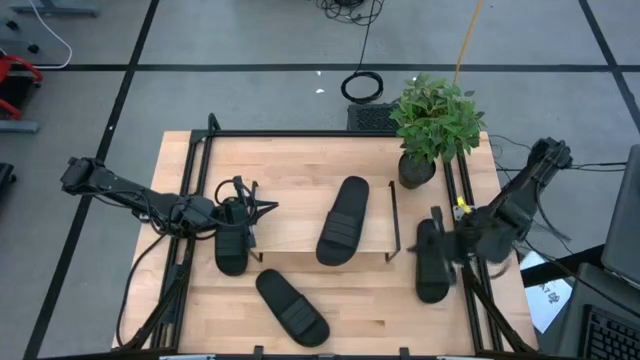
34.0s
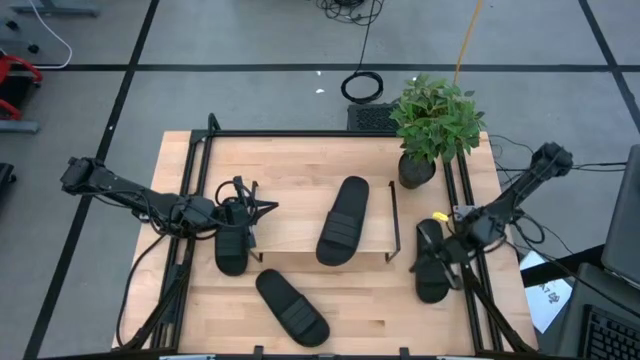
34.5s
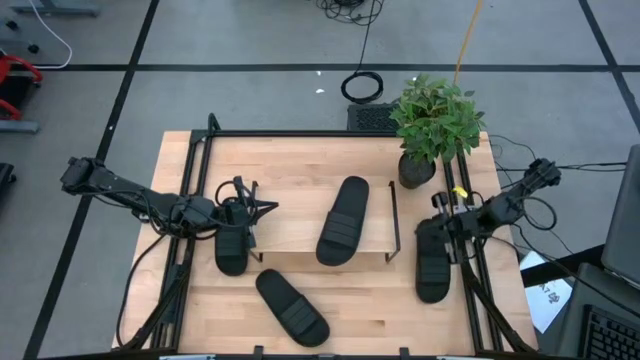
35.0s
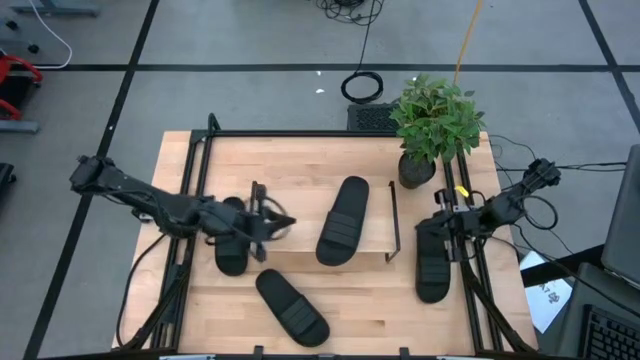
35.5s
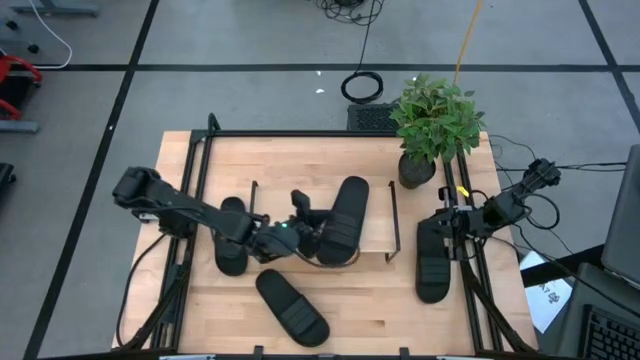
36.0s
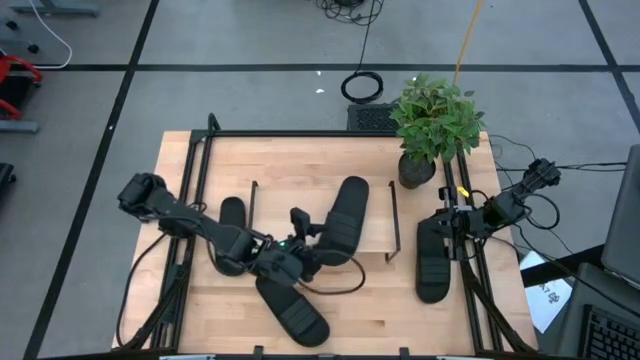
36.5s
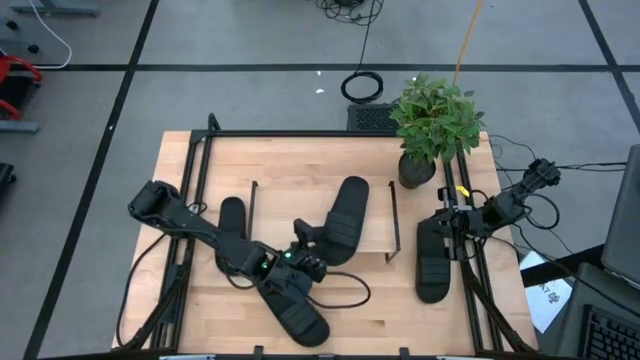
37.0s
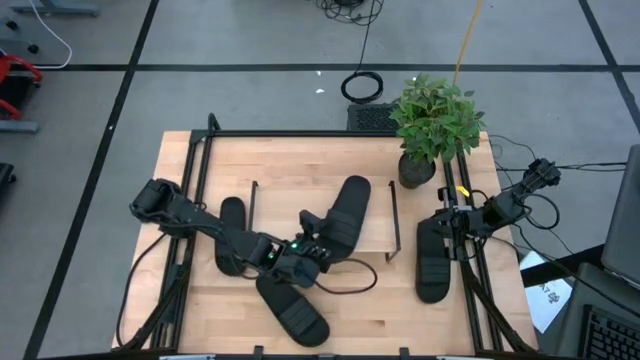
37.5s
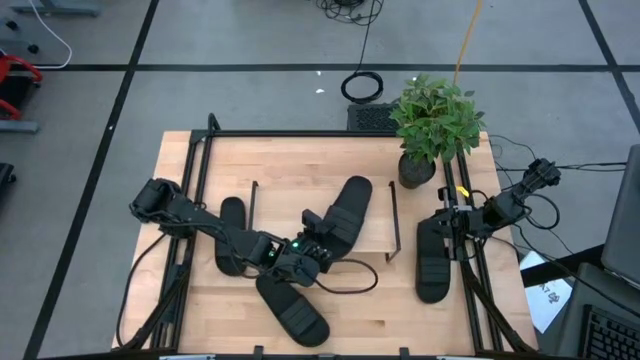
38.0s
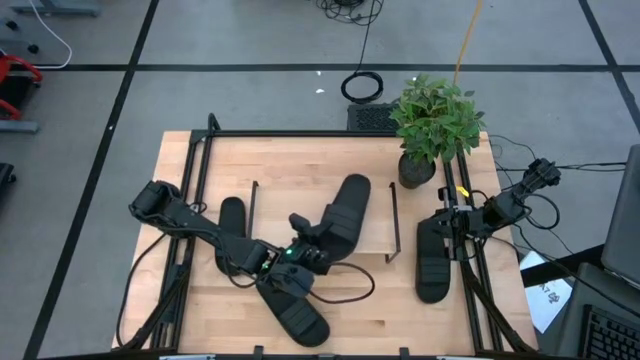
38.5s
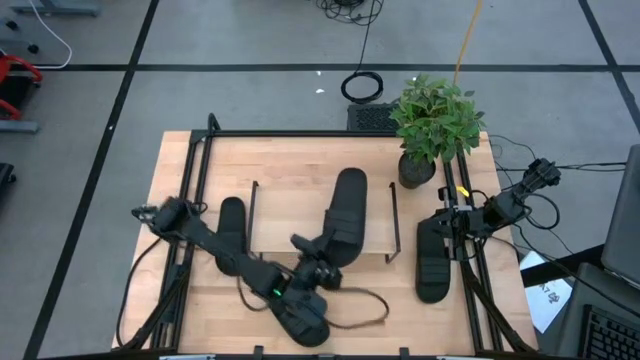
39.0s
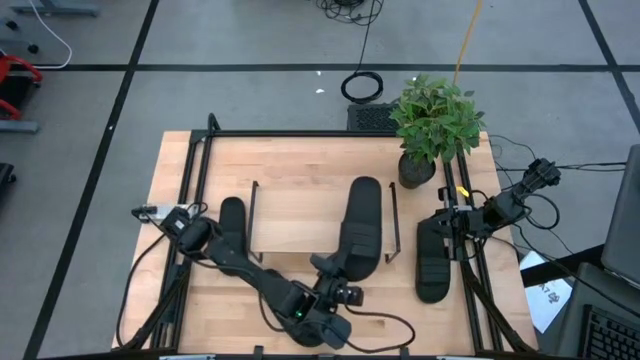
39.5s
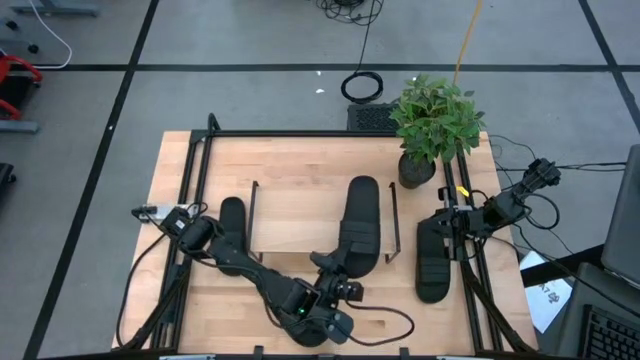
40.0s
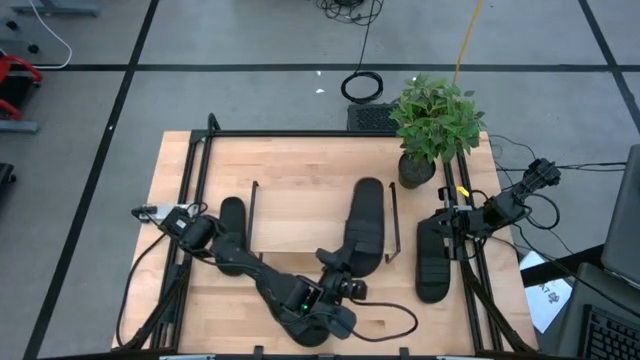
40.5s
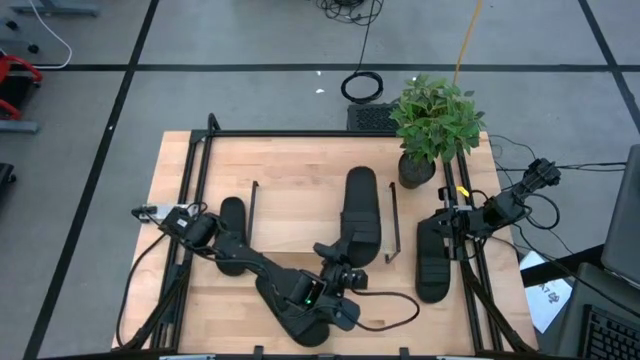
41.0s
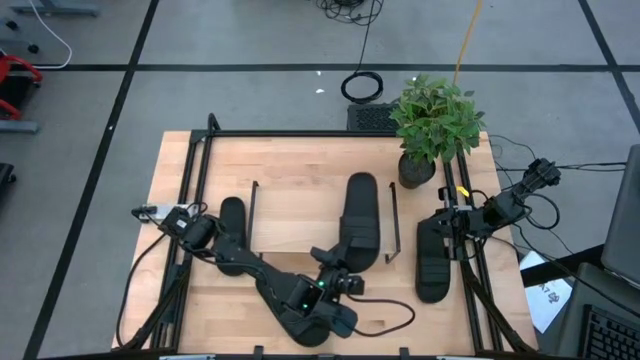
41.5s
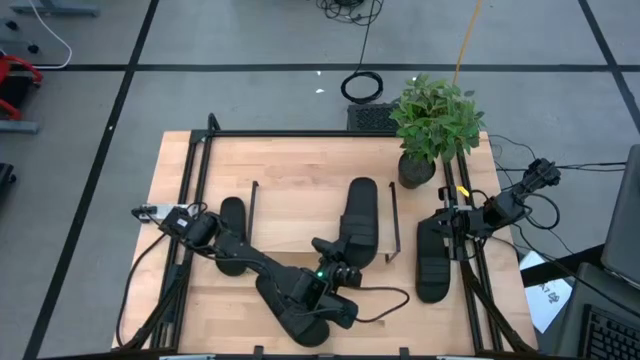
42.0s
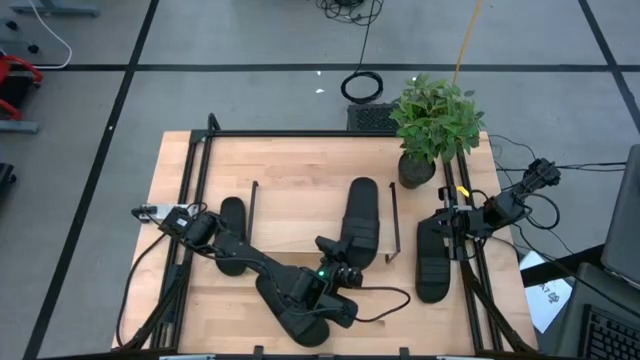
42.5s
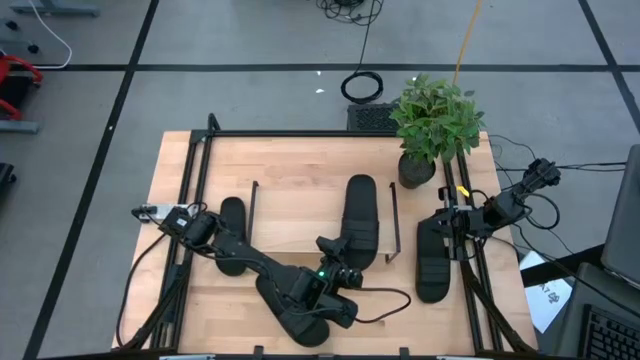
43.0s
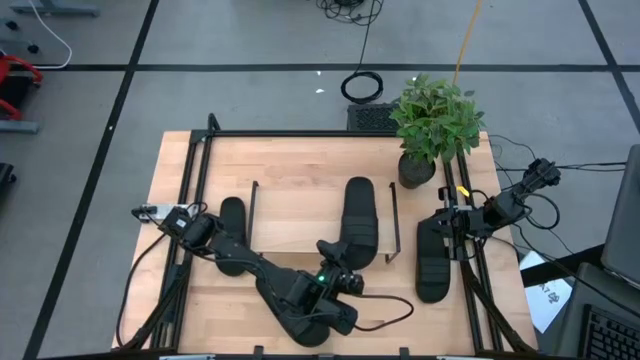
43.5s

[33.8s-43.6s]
Task: Pick and place slides into the shelf
Adjust the black slide on the shelf

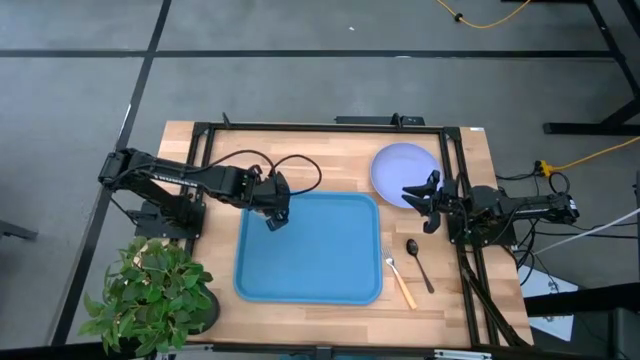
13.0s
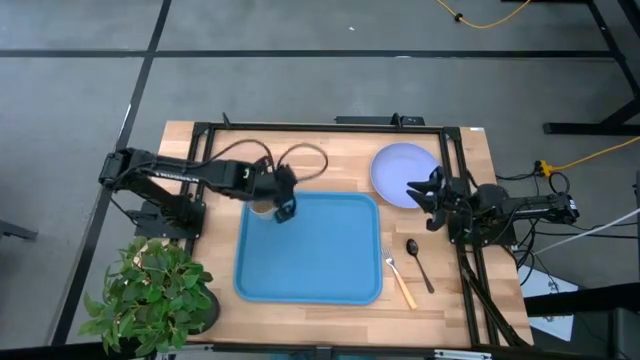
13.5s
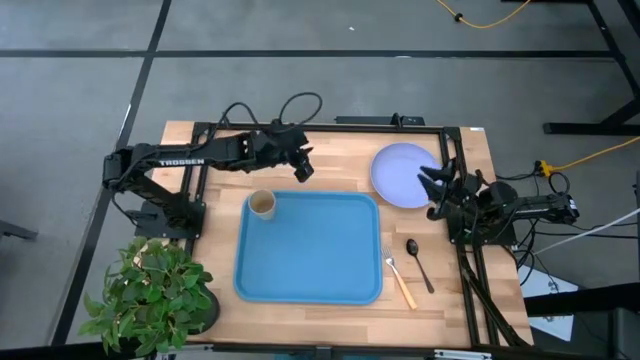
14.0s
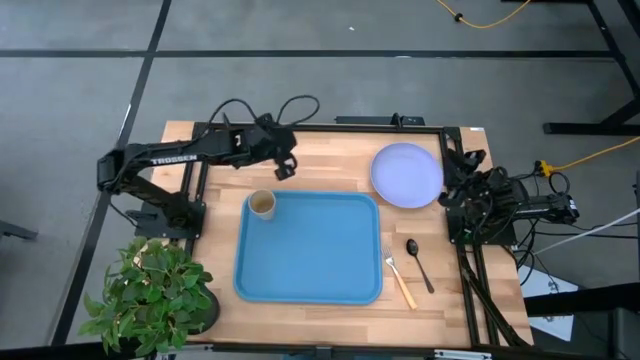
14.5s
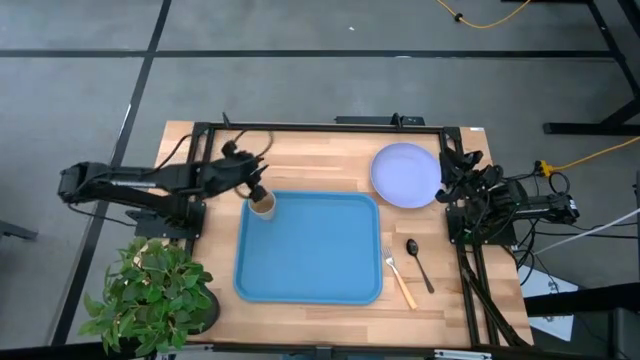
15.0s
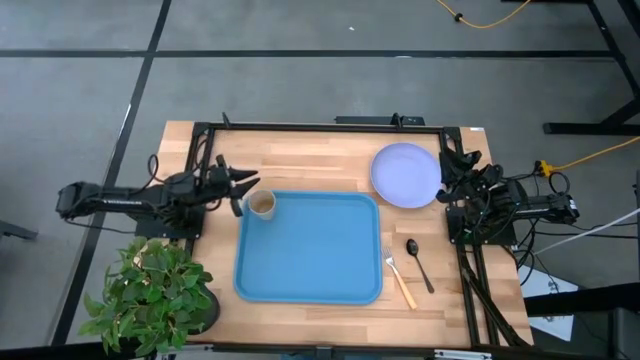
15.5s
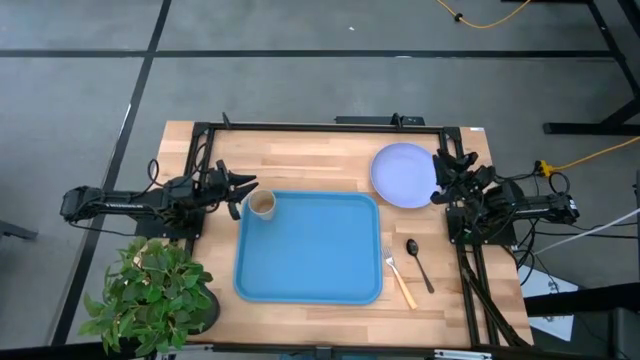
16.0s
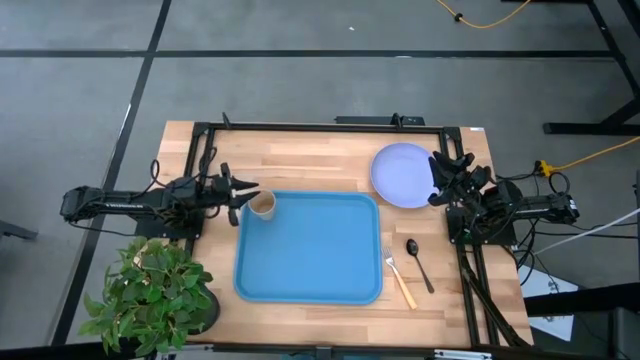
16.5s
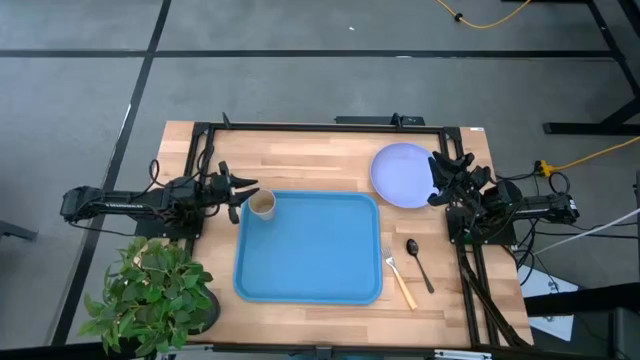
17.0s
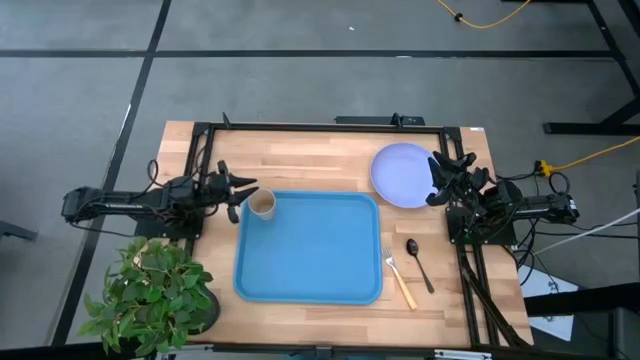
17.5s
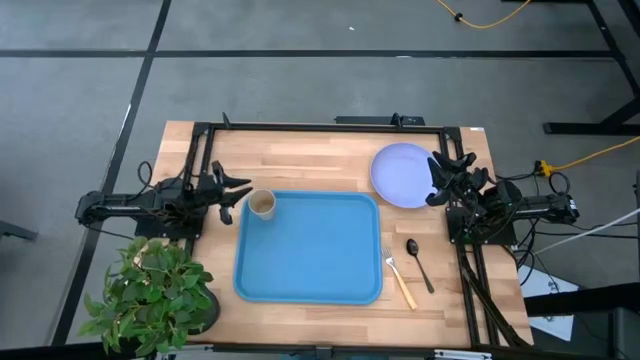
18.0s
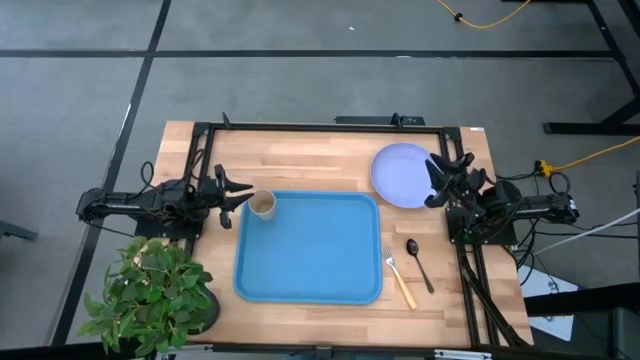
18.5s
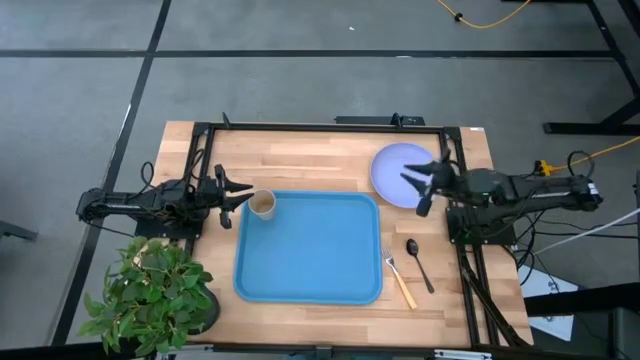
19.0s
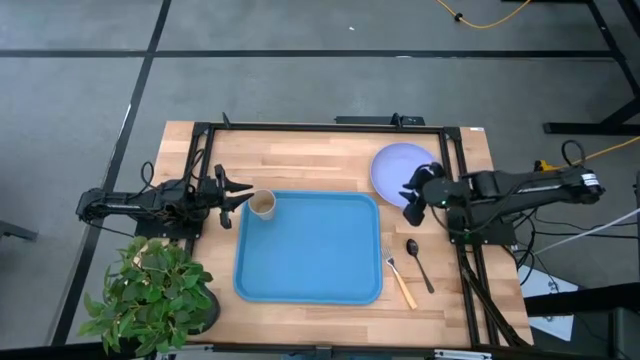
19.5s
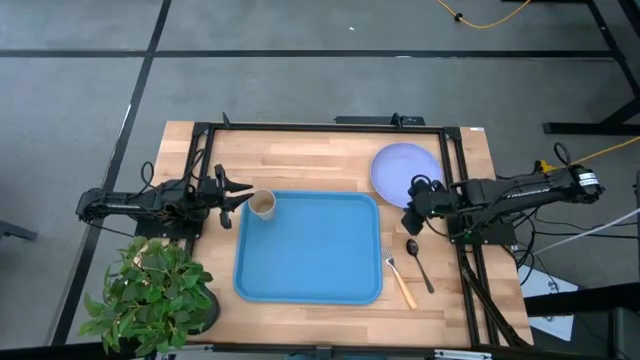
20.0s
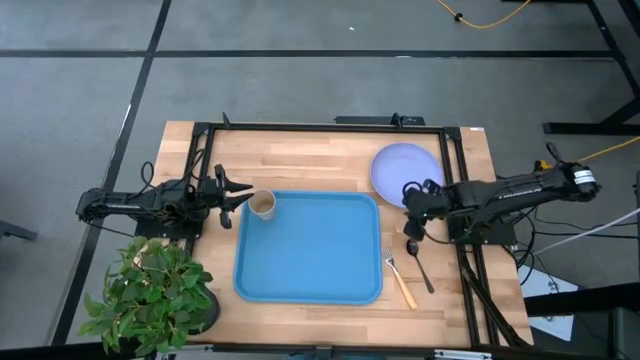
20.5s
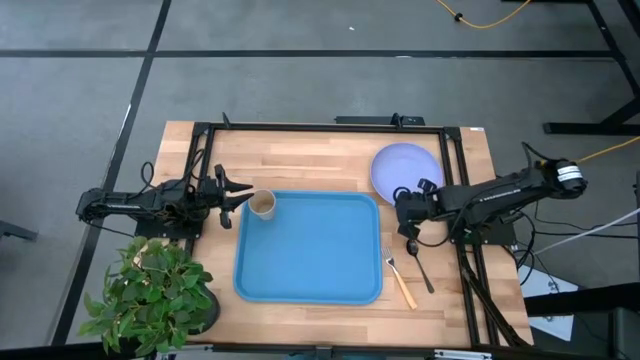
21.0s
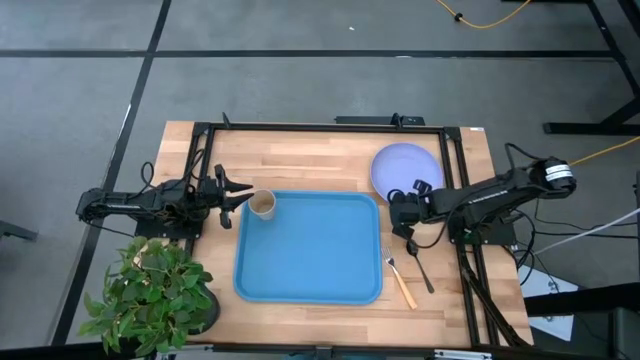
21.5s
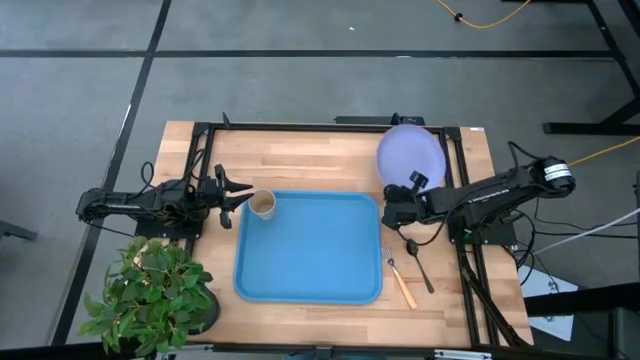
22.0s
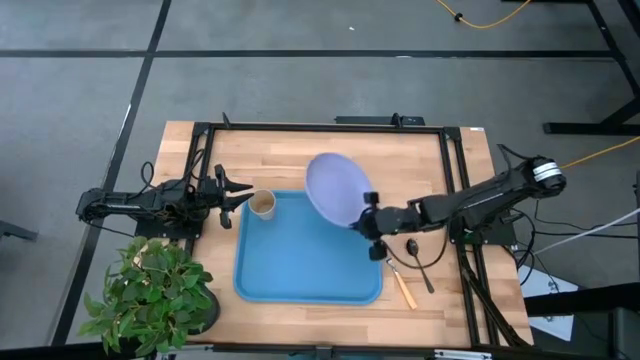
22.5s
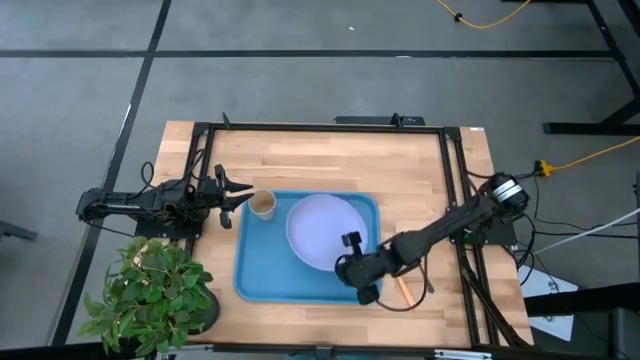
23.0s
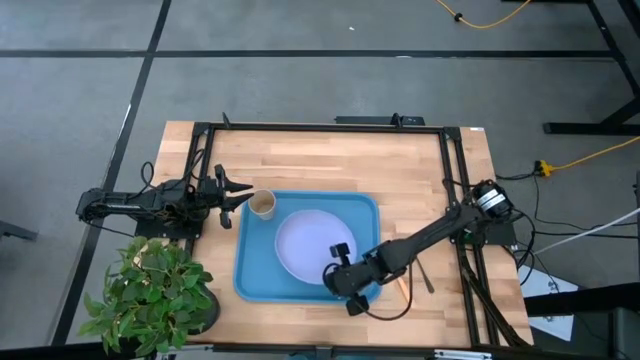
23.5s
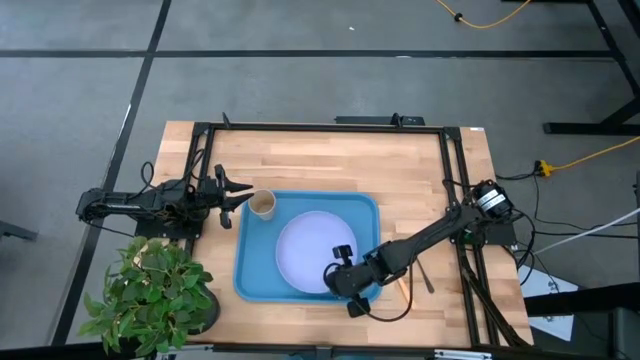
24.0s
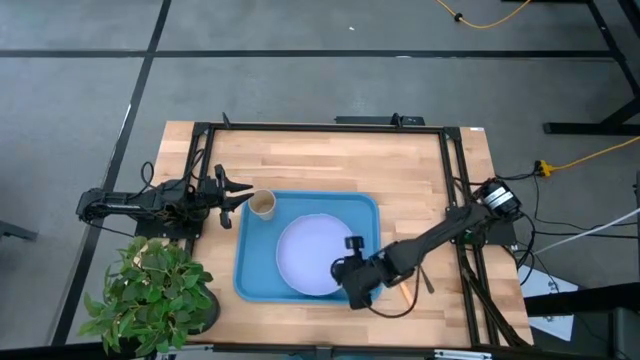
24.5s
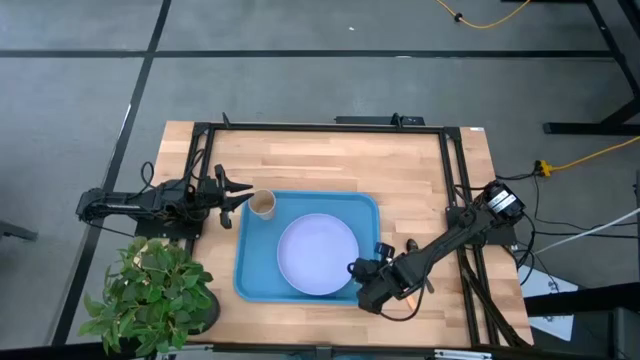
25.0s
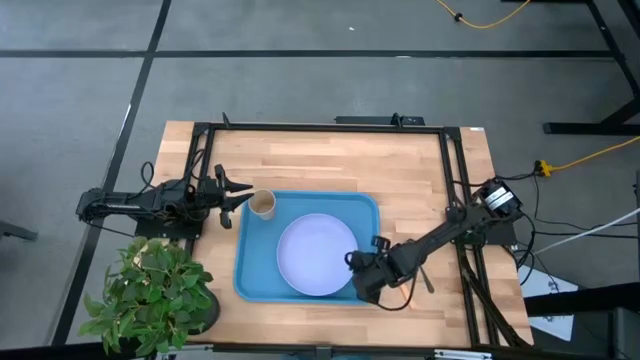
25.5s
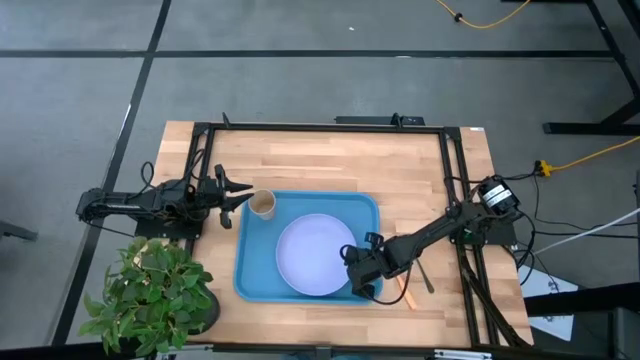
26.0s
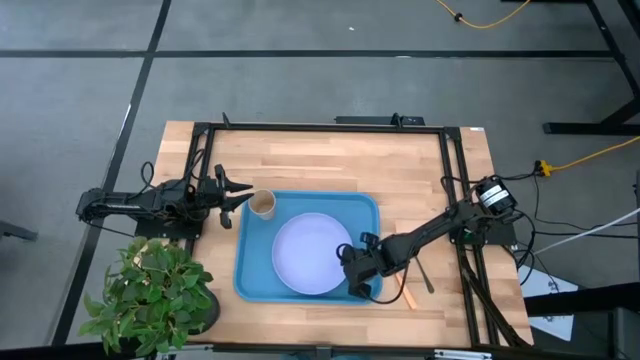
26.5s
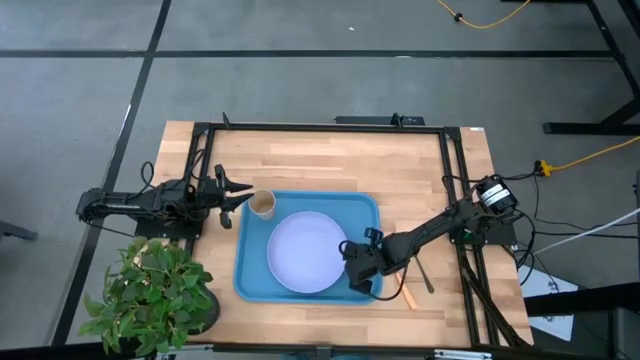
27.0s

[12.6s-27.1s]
Task: Pick and place plate/cup/fork/spoon on tray
Put the purple plate on the blue tray to the bottom right of the brown cup
